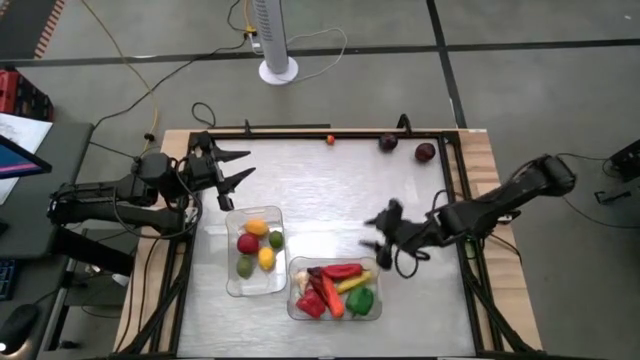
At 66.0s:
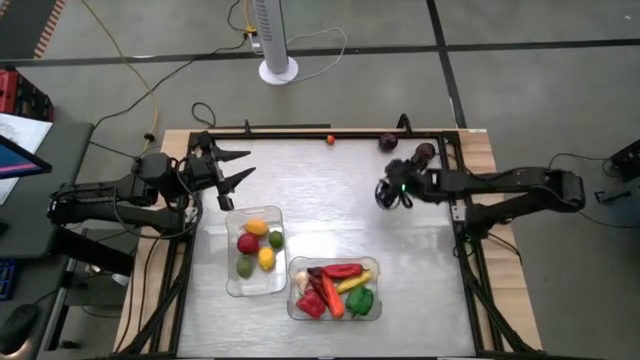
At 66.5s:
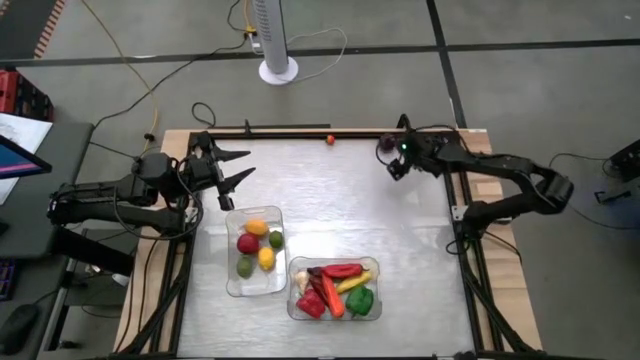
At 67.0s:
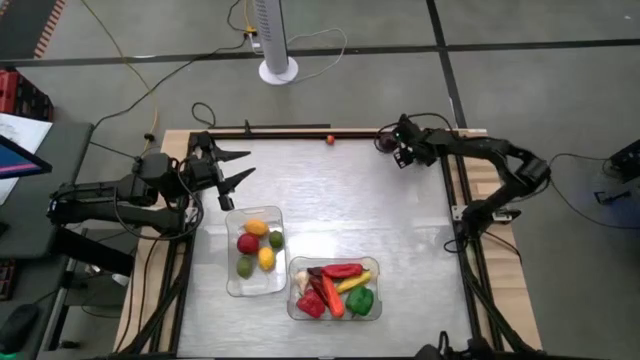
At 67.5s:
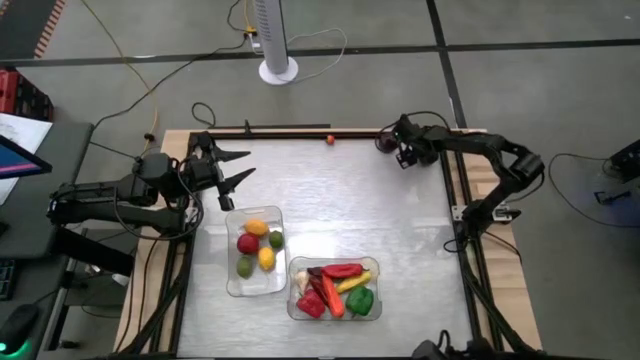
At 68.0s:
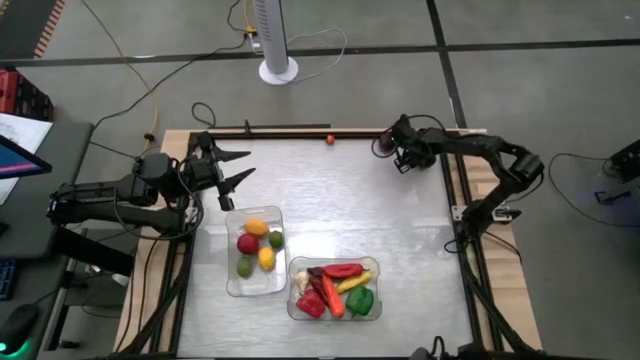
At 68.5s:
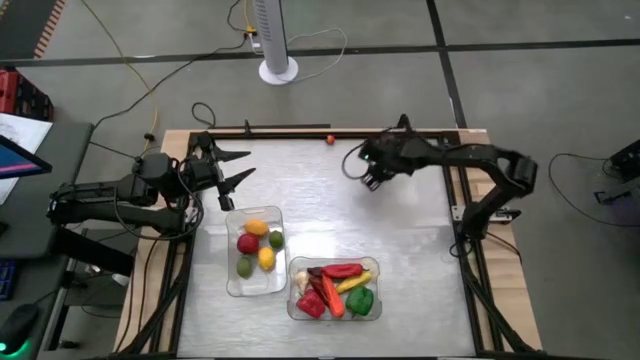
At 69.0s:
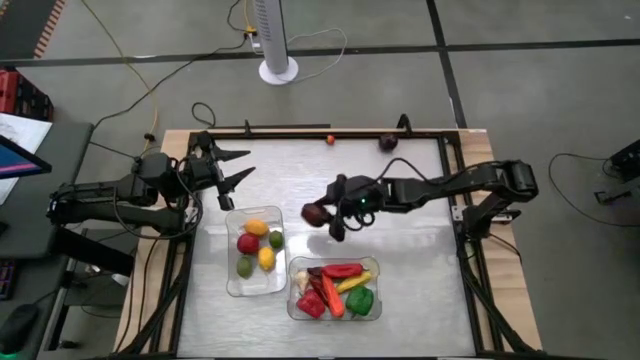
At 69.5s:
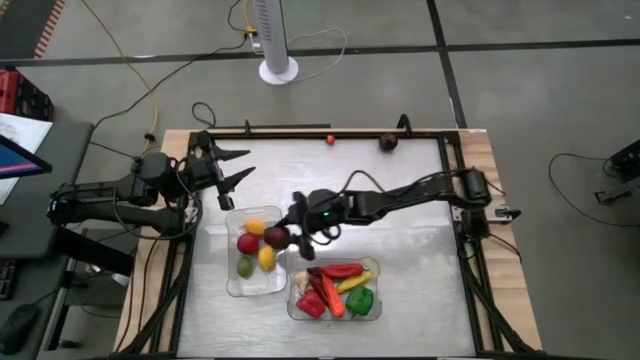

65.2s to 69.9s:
Task: Sort produce into baskets
Put the dark red apple into the left transparent bin

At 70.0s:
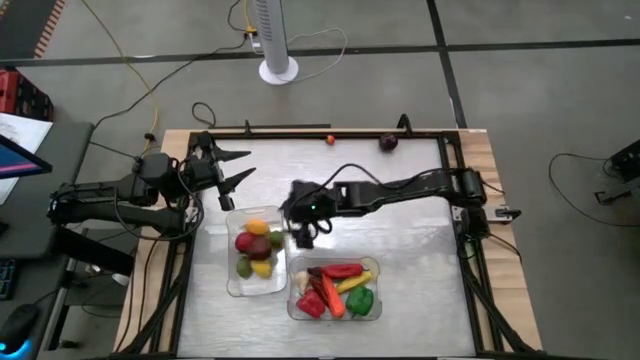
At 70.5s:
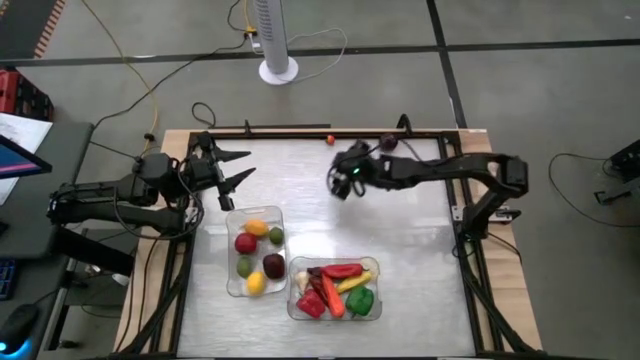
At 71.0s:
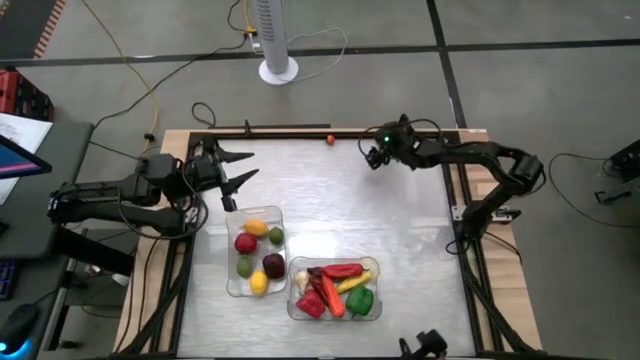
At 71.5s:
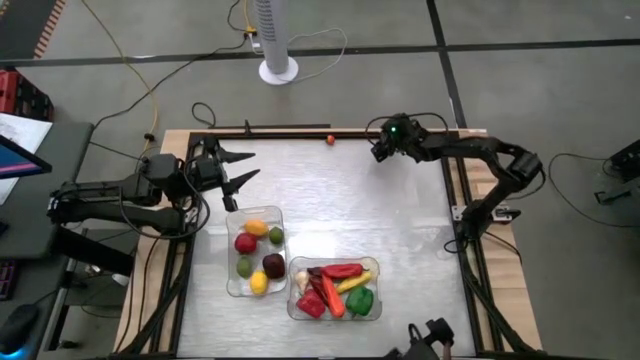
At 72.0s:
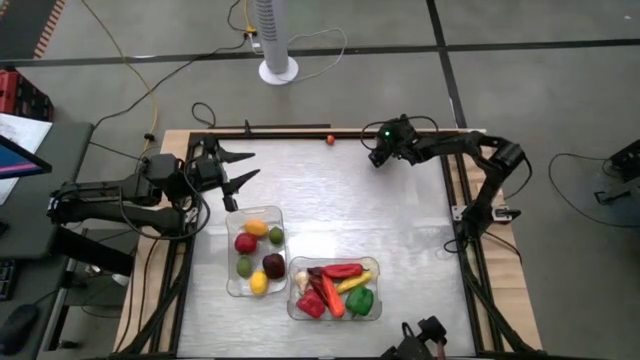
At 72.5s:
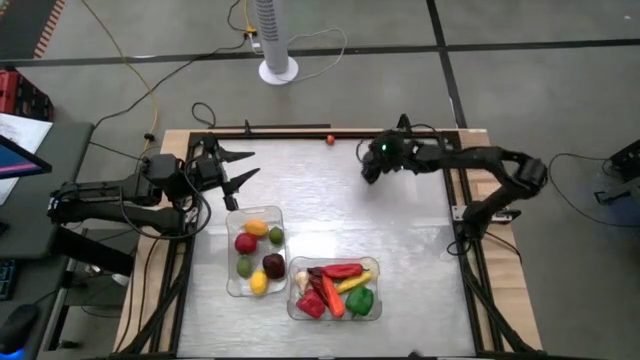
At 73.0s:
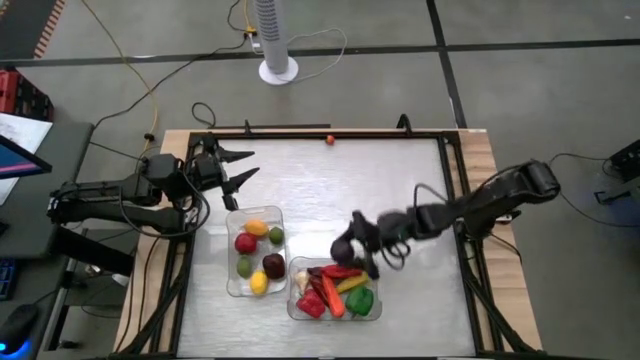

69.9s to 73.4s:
Put the purple plum into the right transparent bin

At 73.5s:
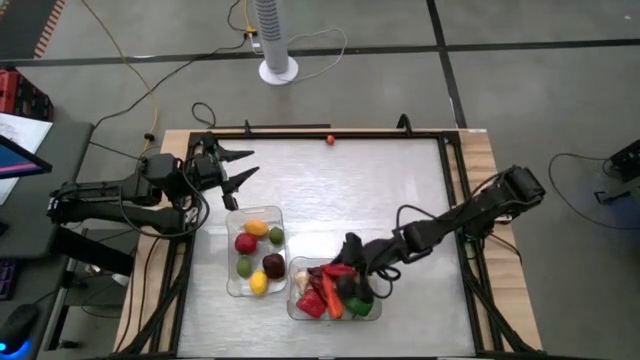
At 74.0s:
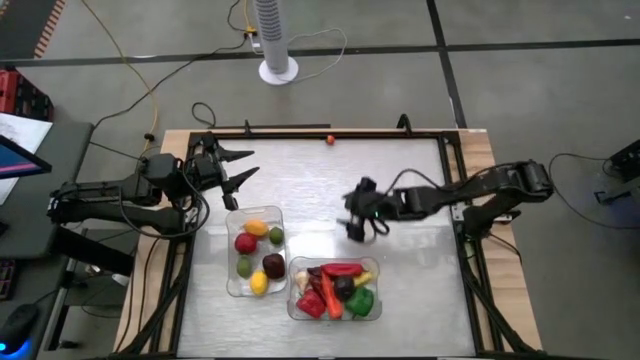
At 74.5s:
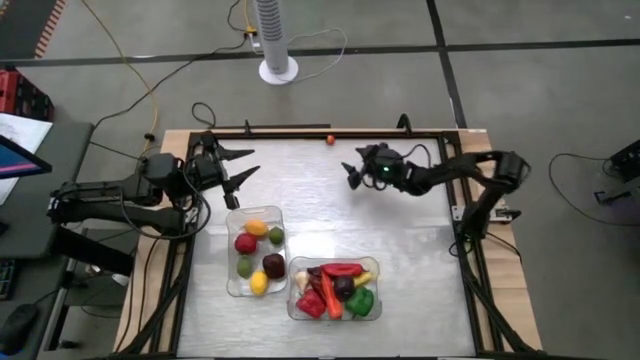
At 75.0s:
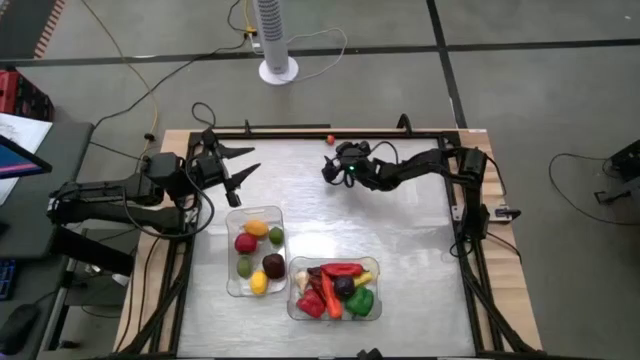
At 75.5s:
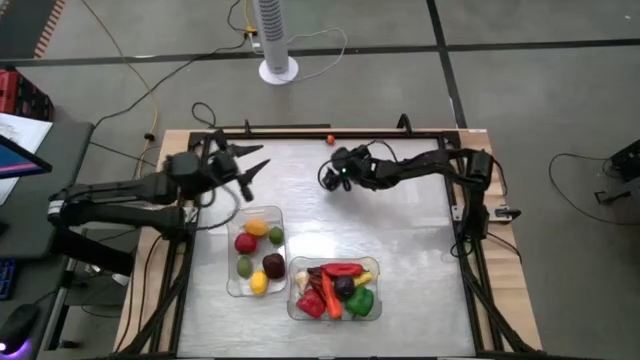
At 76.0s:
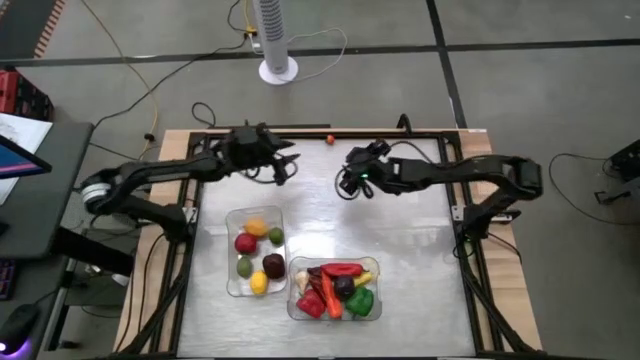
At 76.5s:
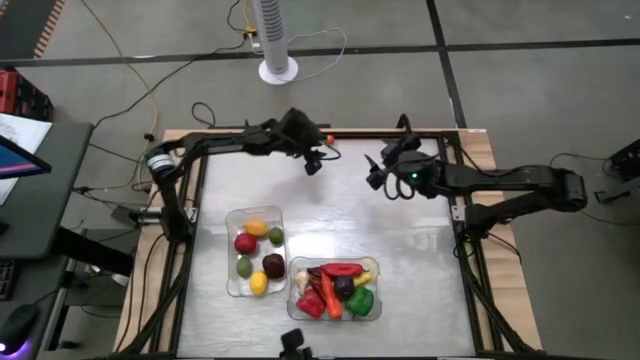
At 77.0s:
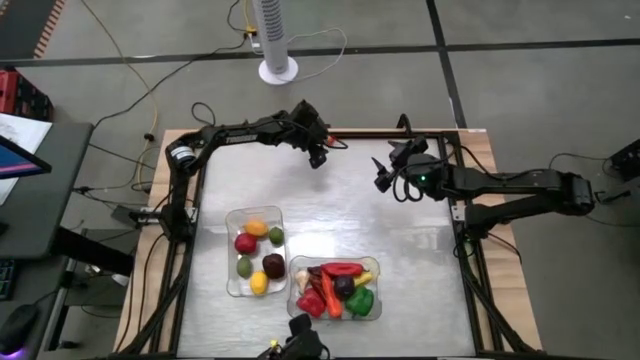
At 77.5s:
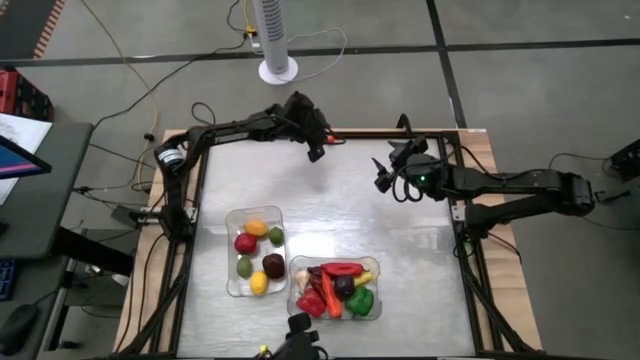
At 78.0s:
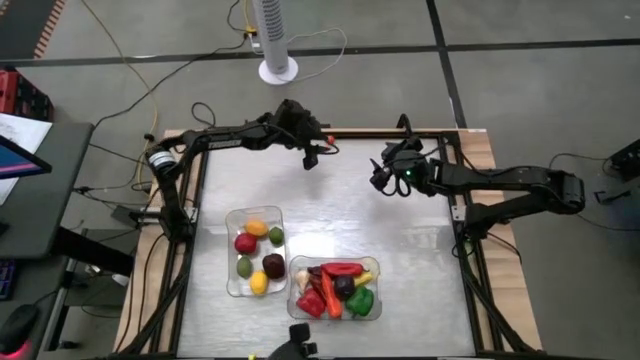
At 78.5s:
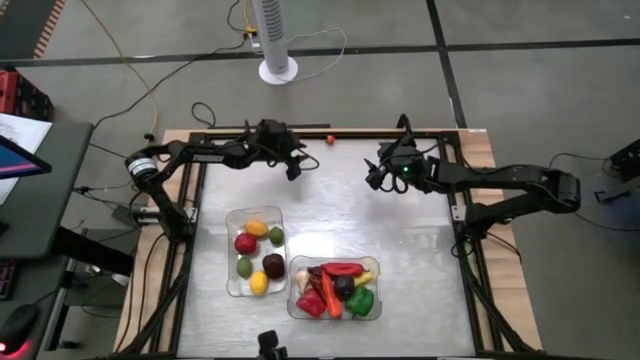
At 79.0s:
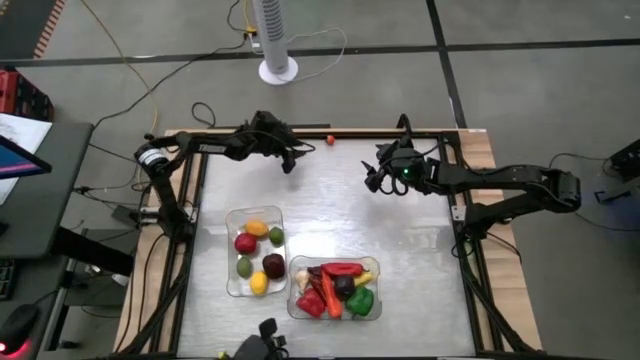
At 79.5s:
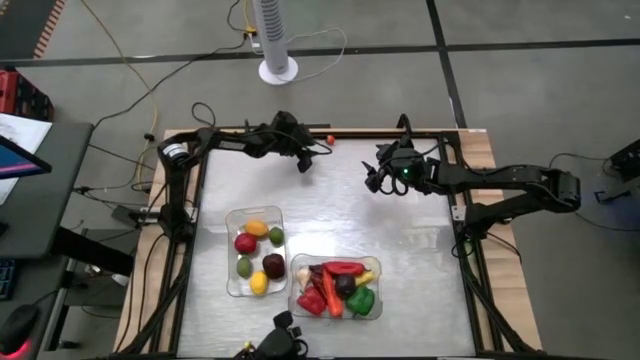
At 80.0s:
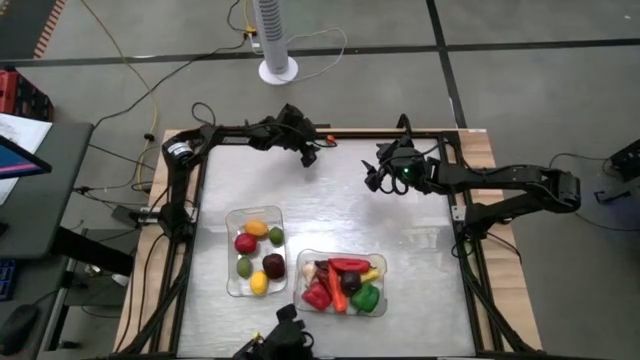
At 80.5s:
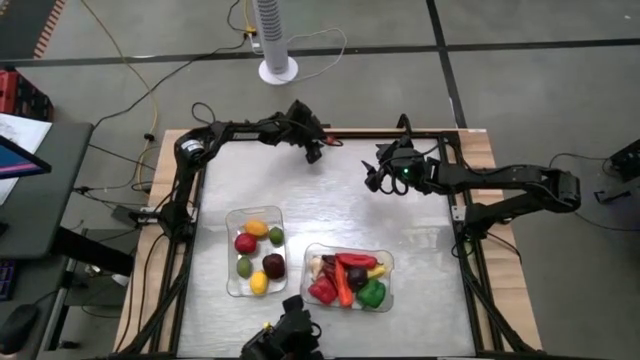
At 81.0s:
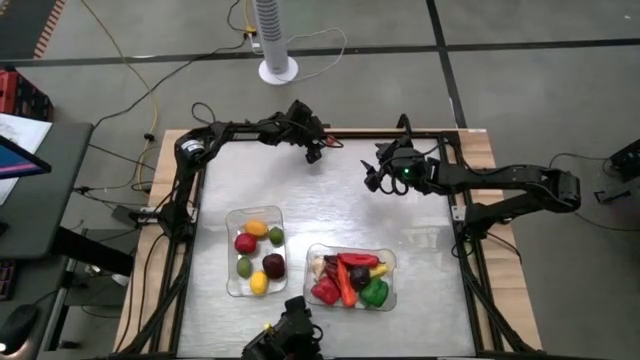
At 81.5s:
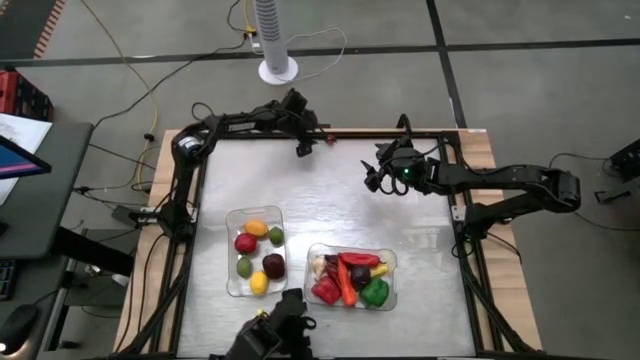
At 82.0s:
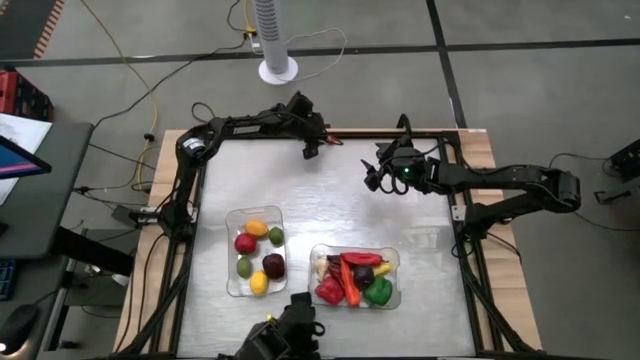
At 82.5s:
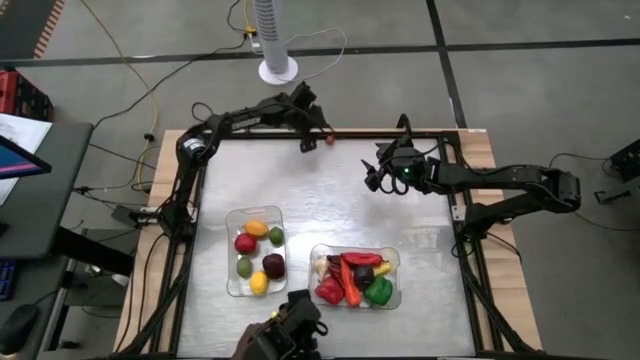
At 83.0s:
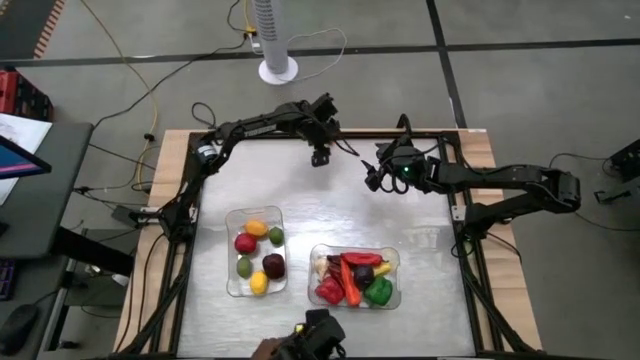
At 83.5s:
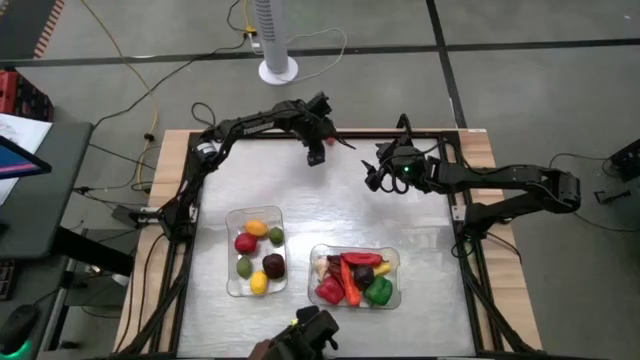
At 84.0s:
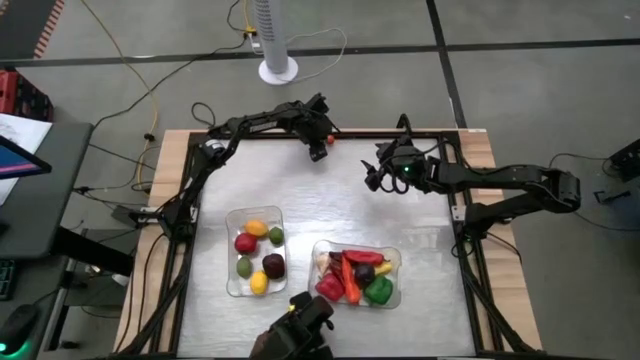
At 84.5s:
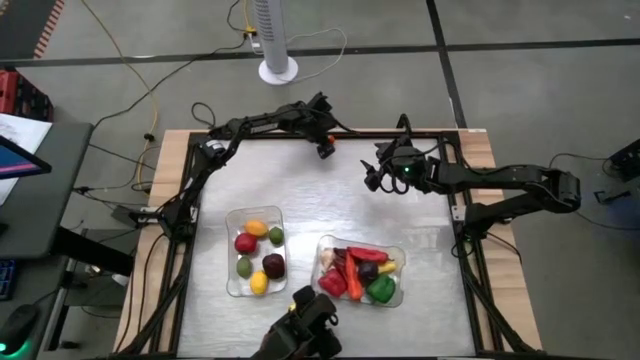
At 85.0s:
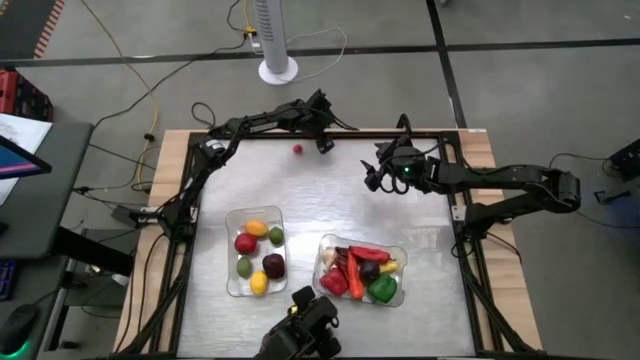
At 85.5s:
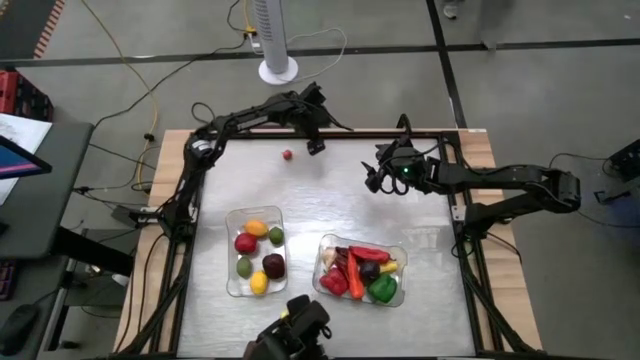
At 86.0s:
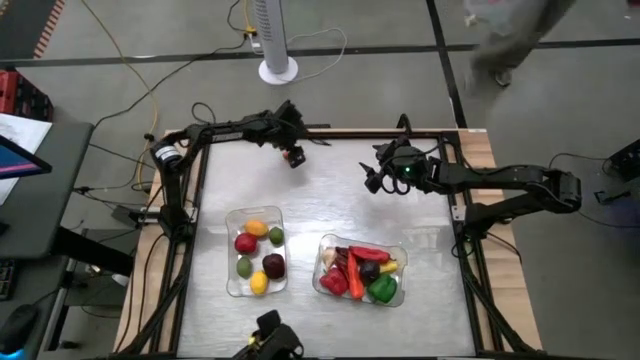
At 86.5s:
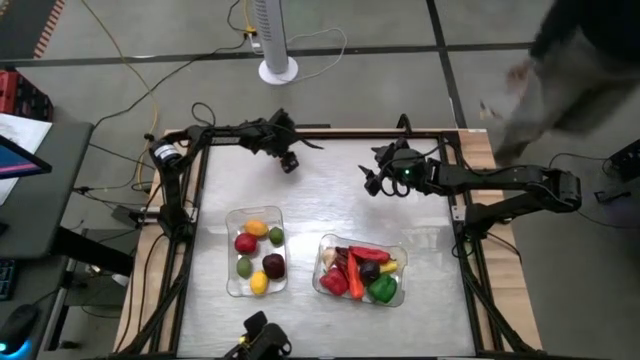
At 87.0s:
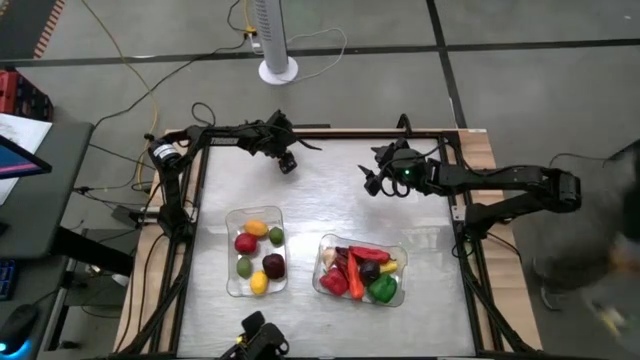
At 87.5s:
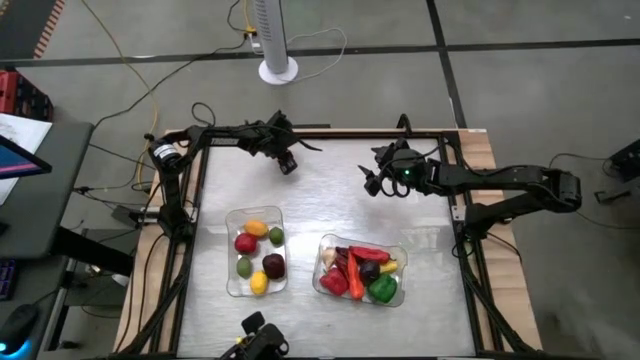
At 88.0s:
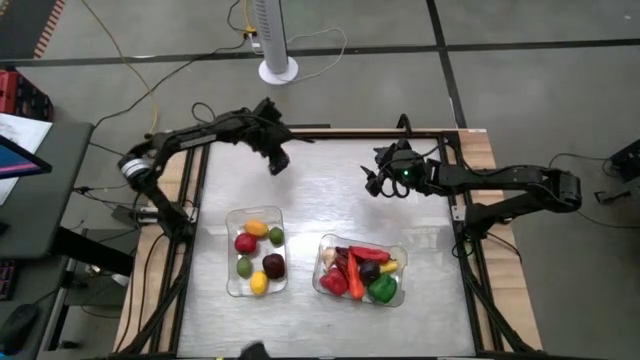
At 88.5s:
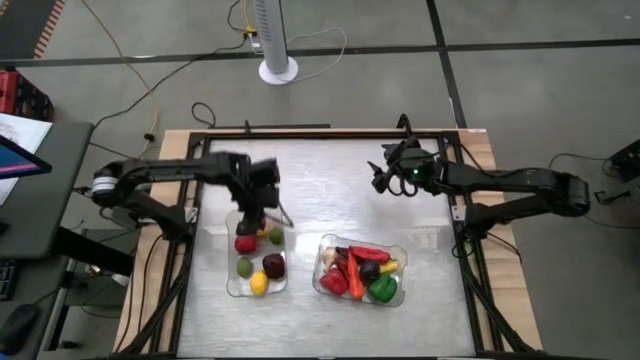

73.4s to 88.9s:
Put the orange tomato into the left transparent bin
